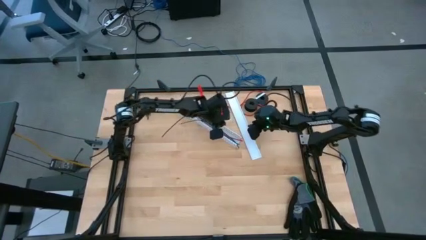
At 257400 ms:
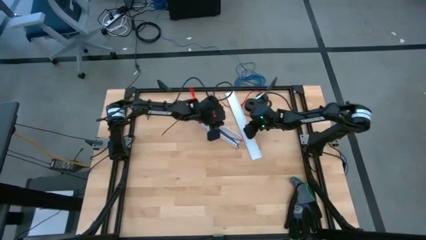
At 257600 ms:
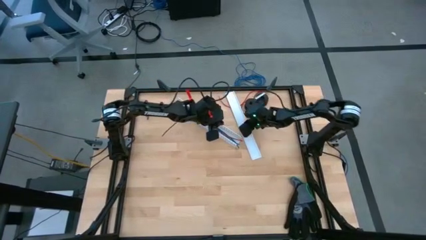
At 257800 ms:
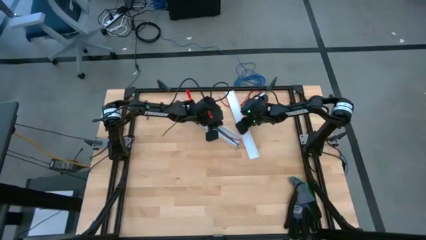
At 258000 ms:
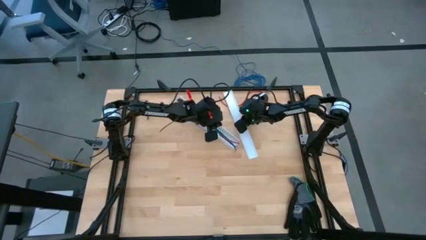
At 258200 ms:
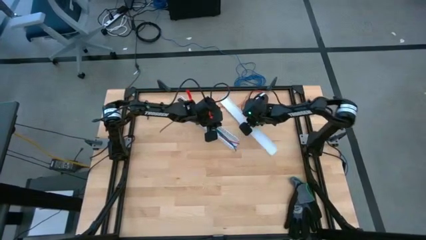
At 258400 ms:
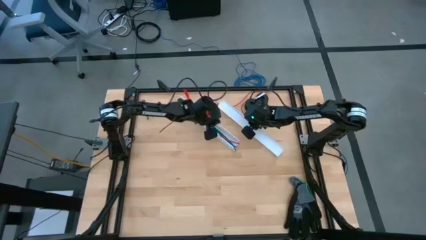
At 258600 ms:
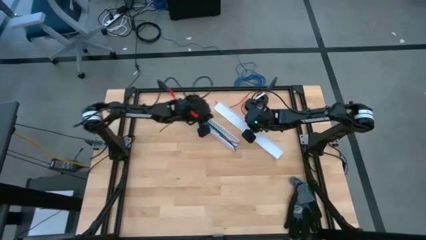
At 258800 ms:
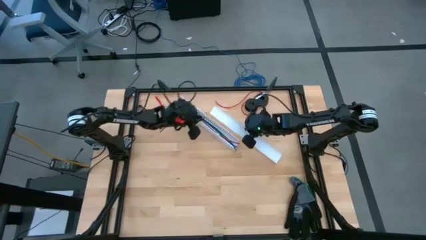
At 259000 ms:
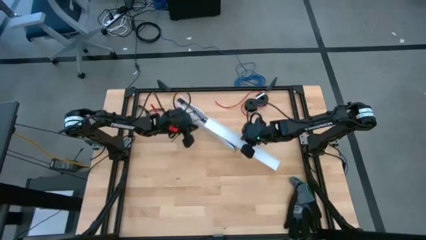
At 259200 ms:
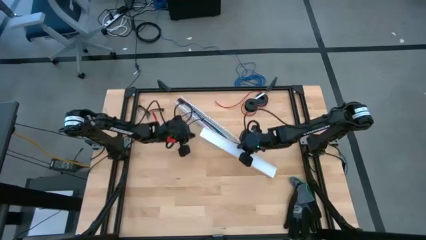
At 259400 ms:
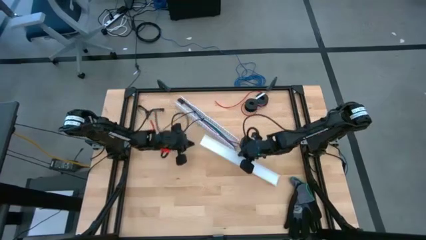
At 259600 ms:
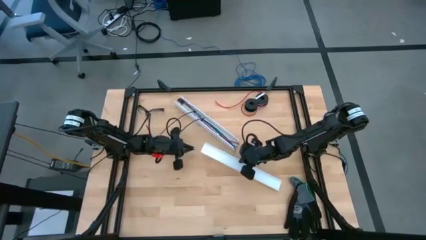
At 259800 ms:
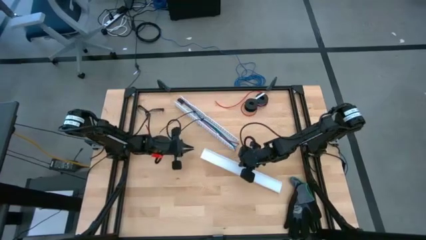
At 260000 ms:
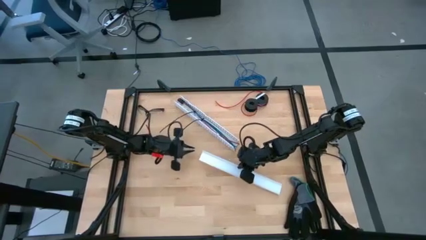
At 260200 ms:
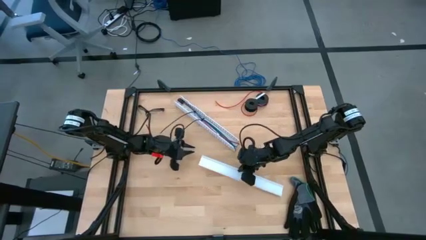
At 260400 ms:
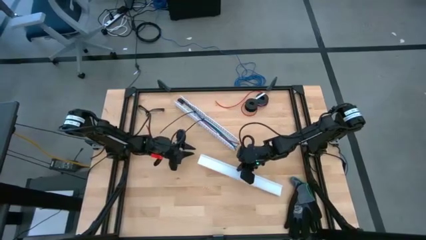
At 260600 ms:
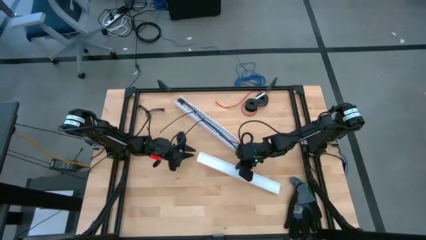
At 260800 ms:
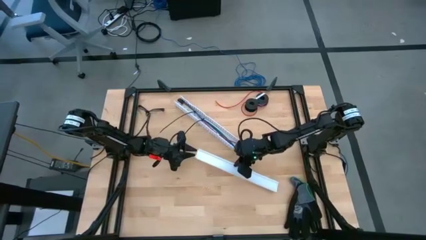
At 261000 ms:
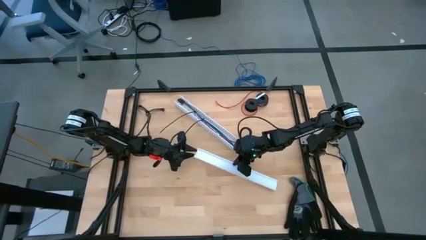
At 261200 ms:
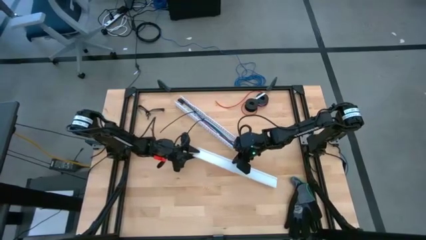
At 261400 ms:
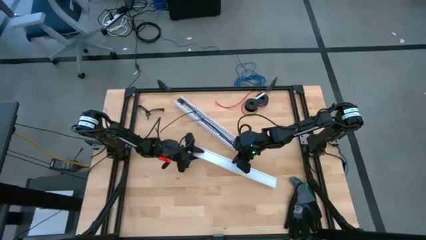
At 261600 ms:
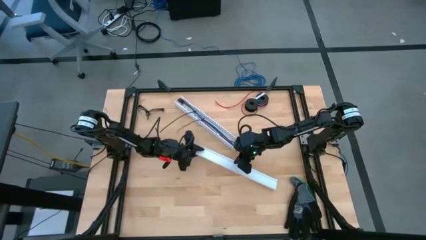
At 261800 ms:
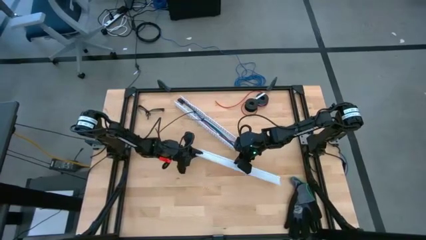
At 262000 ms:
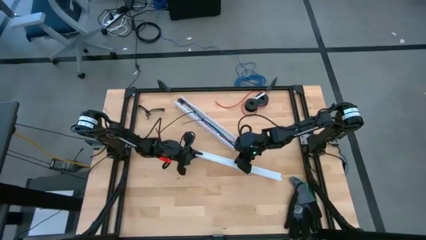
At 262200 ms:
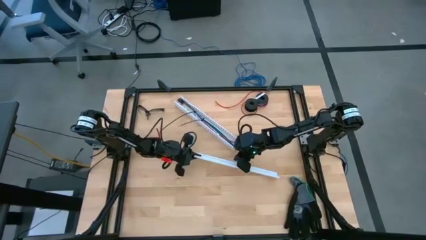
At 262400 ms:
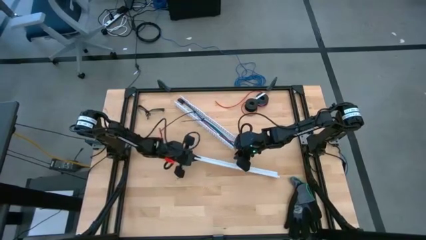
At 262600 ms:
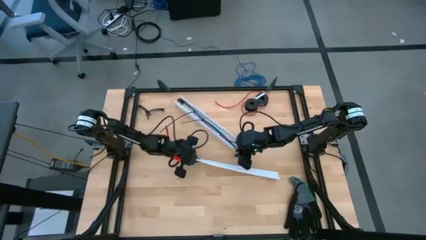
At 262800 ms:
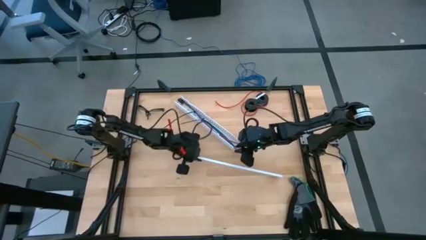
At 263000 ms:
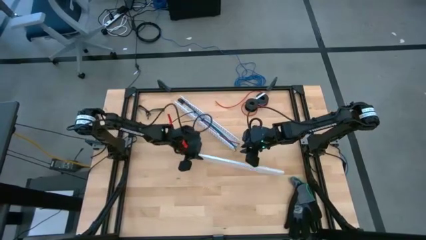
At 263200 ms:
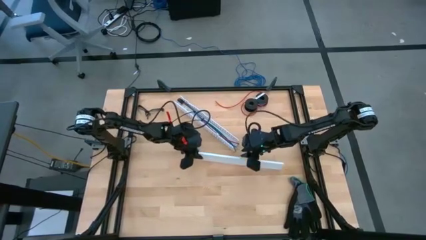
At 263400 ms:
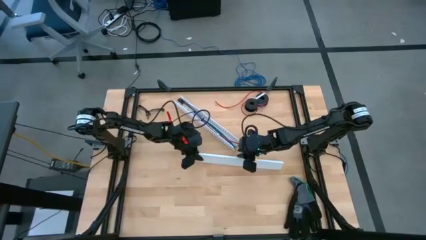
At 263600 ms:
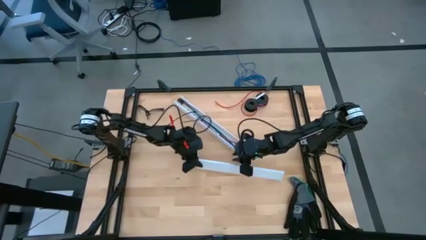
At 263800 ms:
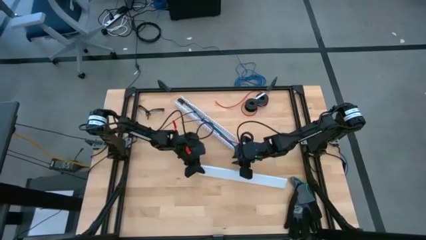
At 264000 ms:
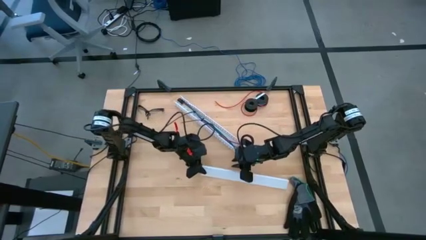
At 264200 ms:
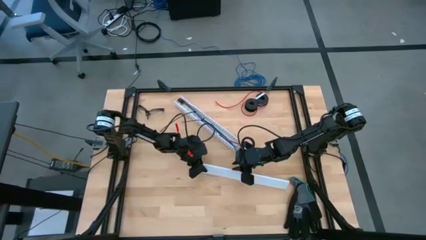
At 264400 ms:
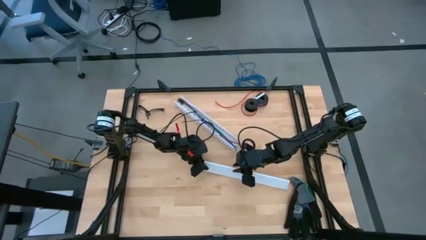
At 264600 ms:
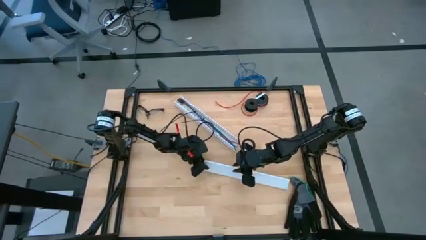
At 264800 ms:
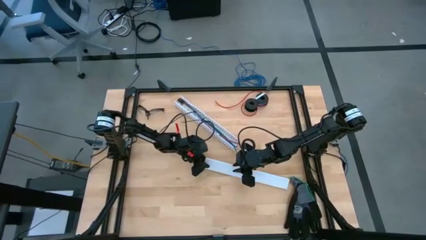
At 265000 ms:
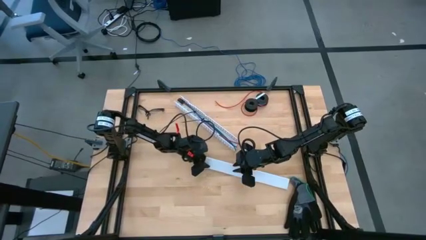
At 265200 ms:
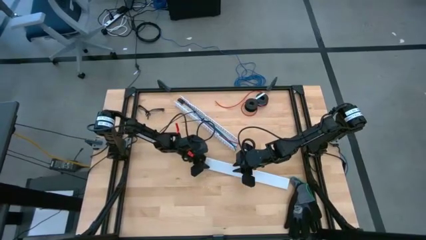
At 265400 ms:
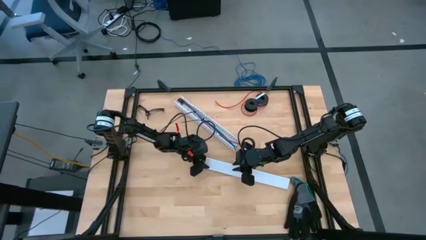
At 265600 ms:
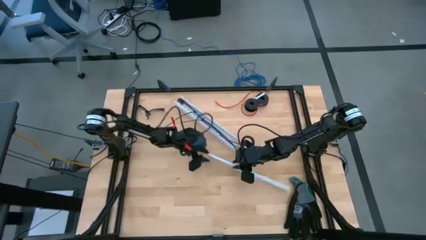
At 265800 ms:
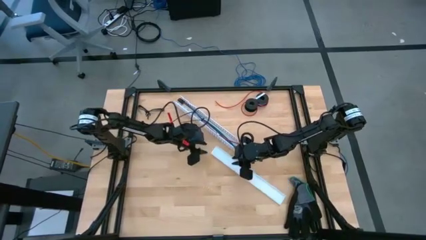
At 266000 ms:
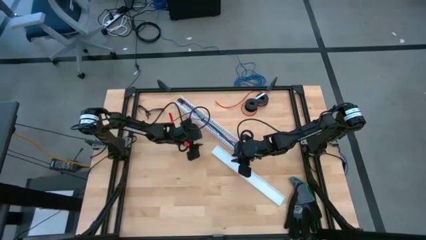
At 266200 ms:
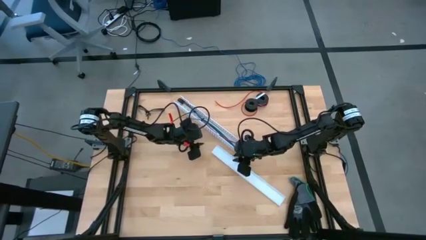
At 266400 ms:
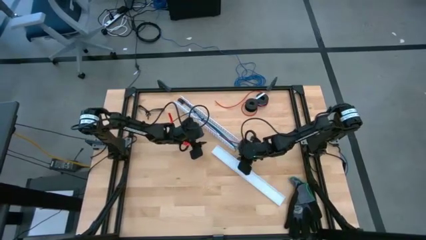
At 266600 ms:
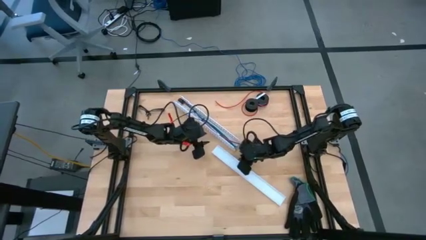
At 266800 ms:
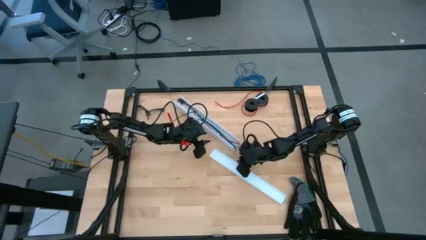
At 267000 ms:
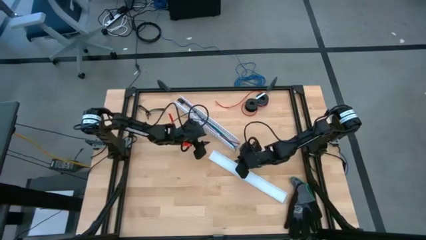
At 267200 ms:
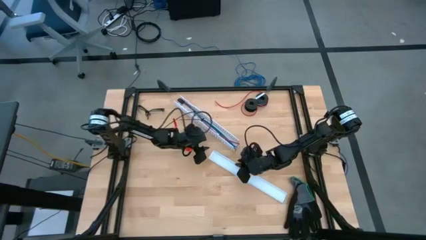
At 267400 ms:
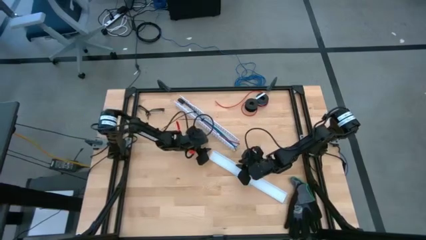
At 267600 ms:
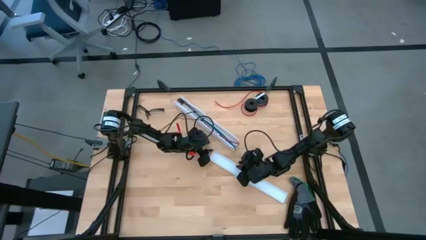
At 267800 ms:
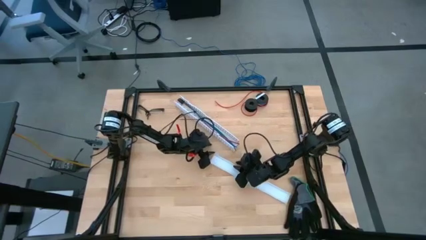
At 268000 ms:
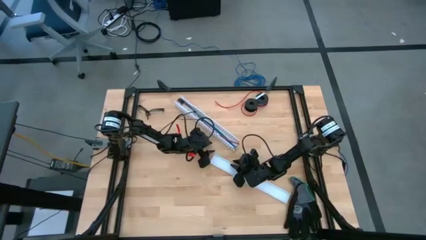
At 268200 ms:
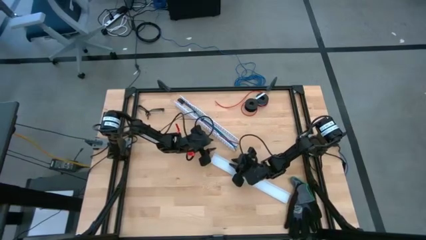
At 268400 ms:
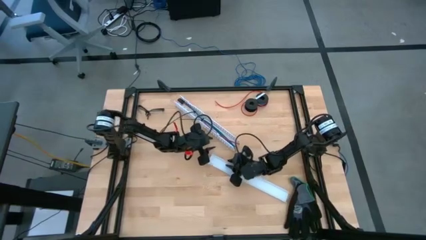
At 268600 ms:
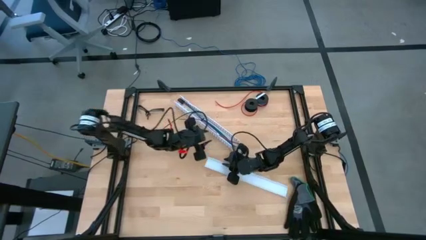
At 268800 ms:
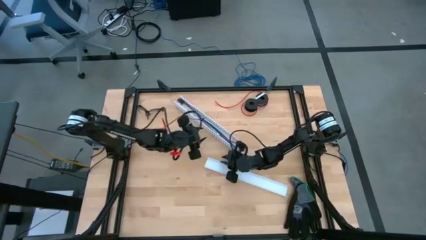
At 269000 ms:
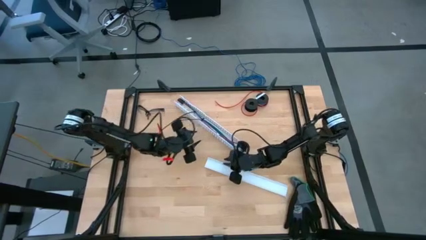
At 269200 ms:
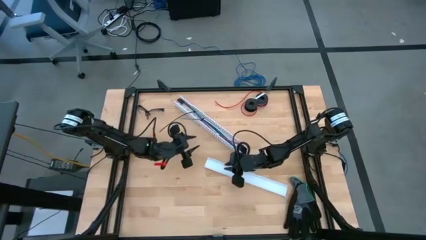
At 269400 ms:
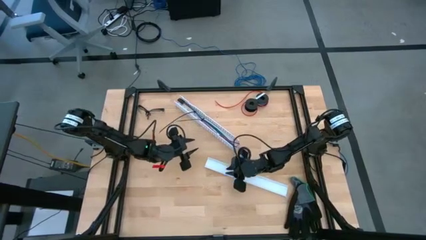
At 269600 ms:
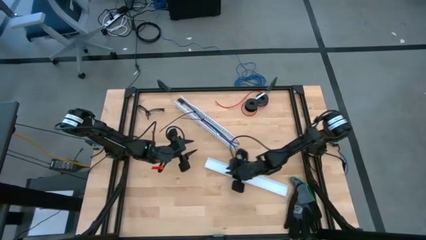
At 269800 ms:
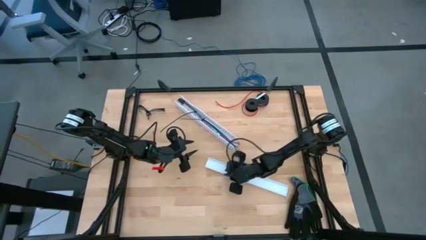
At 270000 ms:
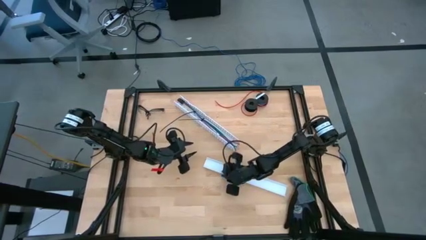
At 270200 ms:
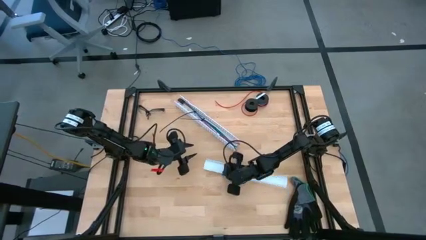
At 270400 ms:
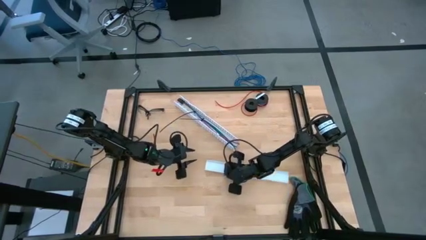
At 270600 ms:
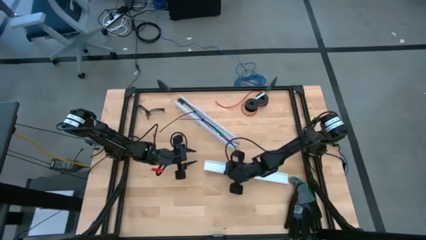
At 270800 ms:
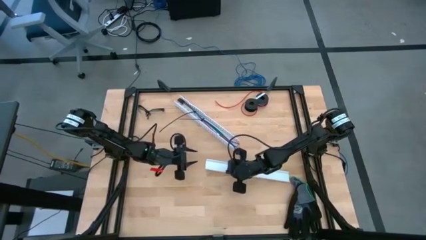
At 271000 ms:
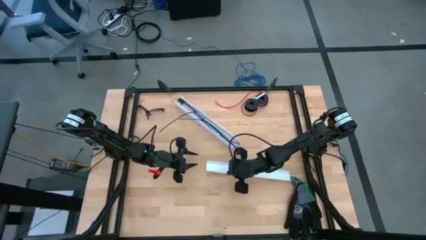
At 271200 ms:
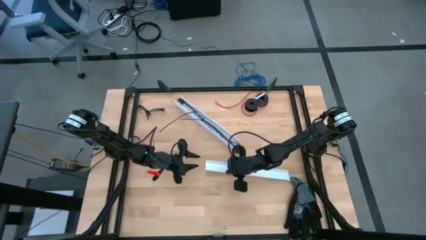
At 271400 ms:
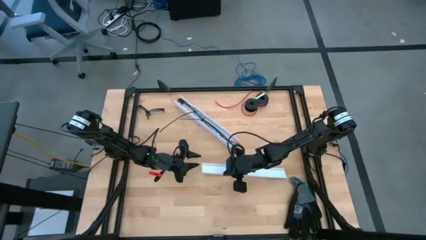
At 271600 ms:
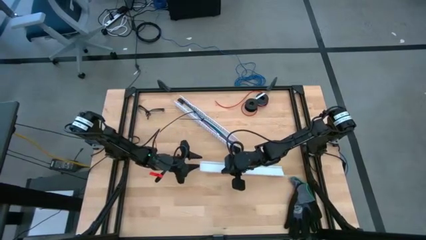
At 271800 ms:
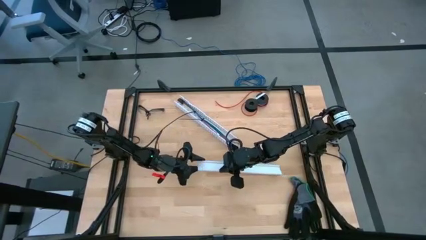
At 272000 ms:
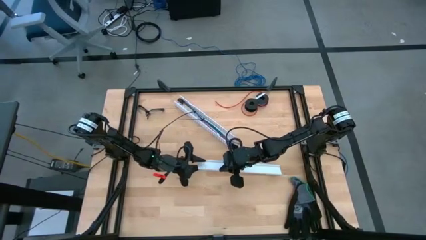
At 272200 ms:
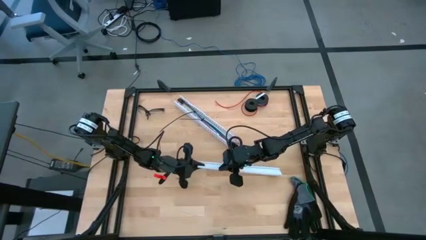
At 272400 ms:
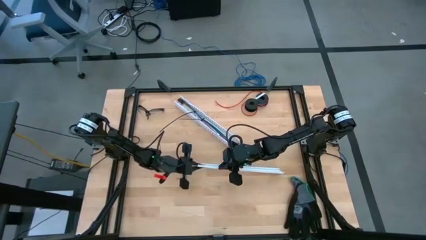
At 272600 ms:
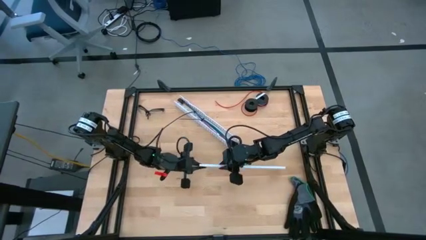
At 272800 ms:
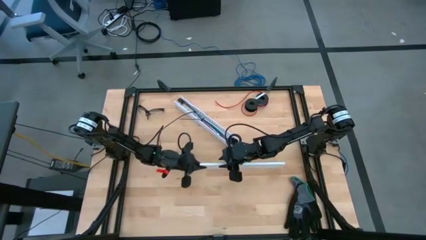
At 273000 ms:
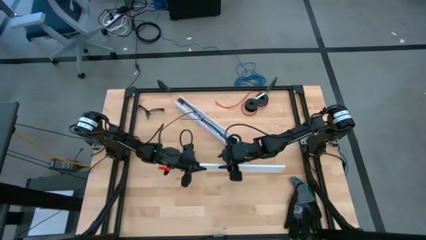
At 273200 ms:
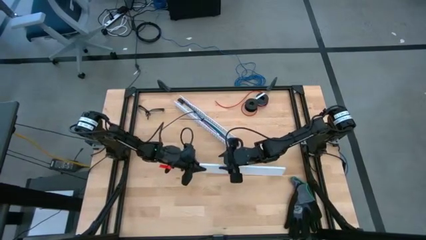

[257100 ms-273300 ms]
Task: Ziptie cables
Close the white cable duct
